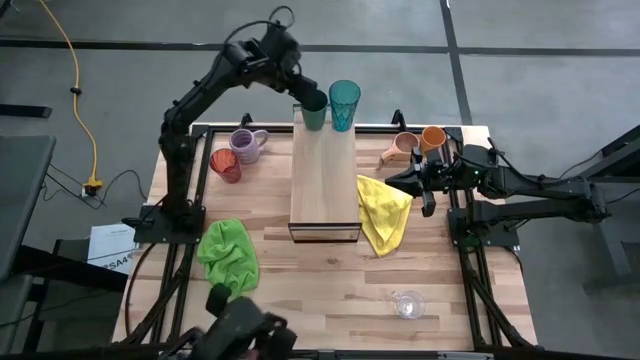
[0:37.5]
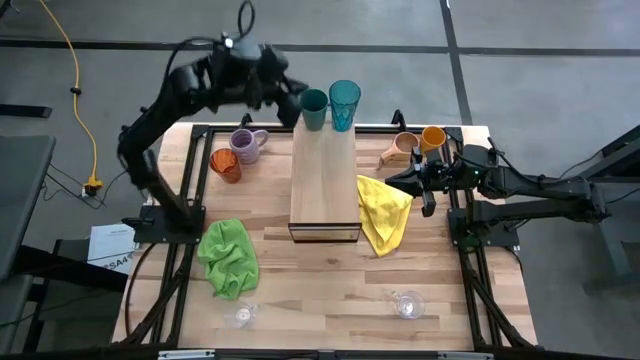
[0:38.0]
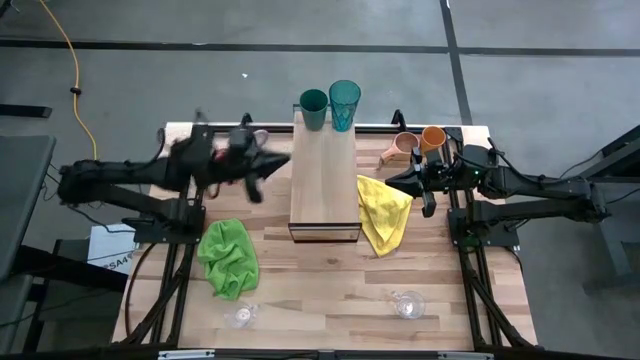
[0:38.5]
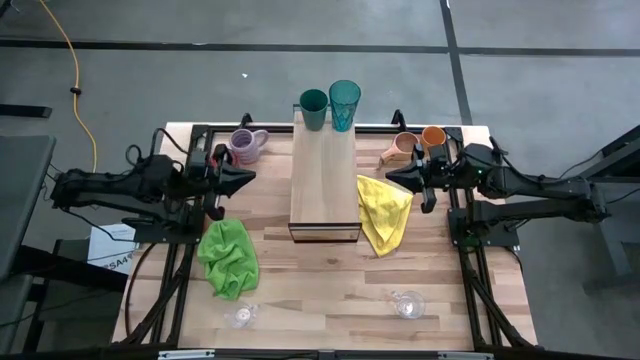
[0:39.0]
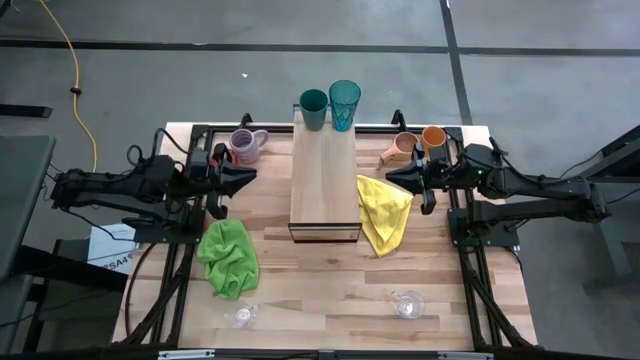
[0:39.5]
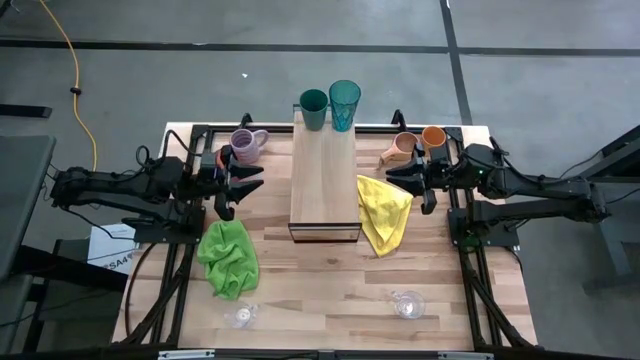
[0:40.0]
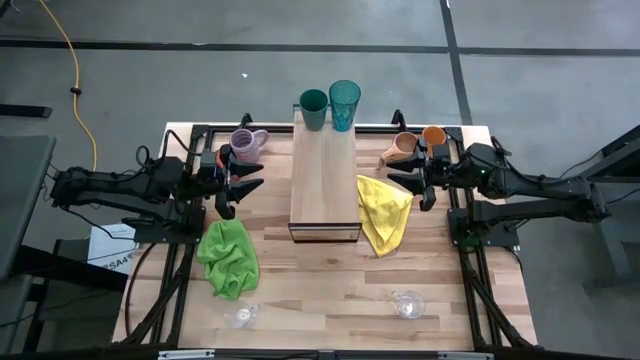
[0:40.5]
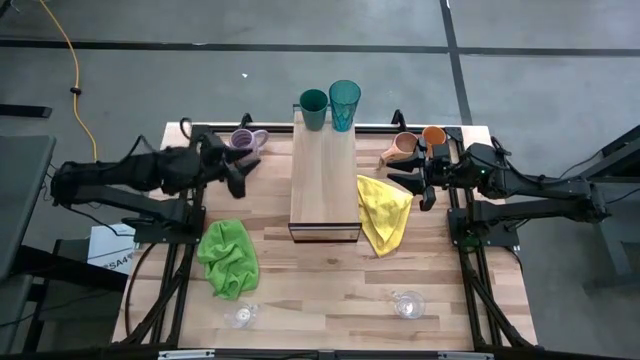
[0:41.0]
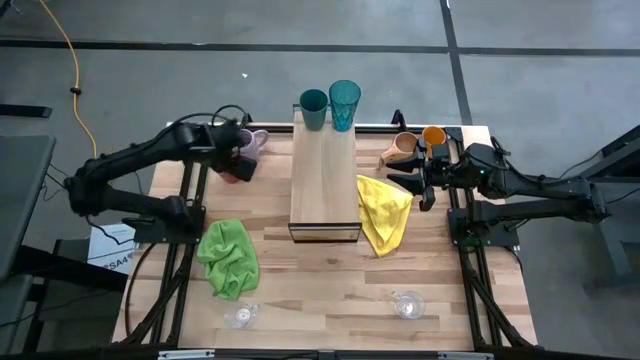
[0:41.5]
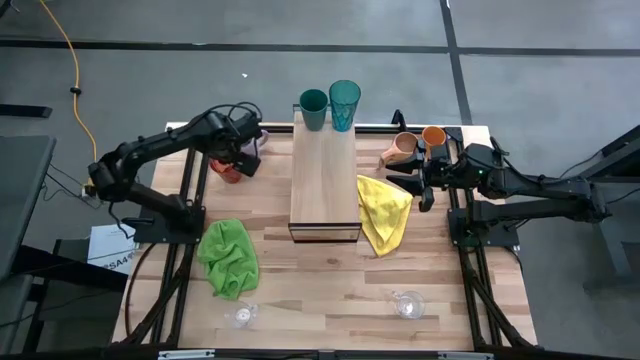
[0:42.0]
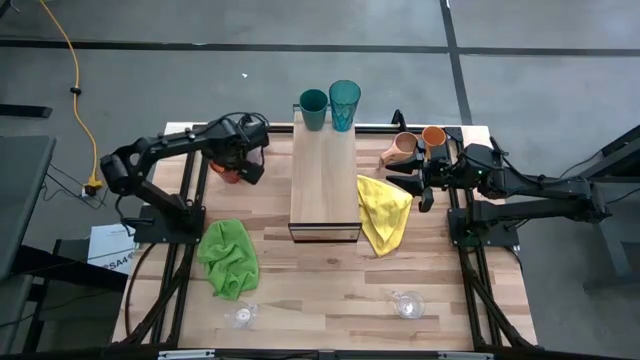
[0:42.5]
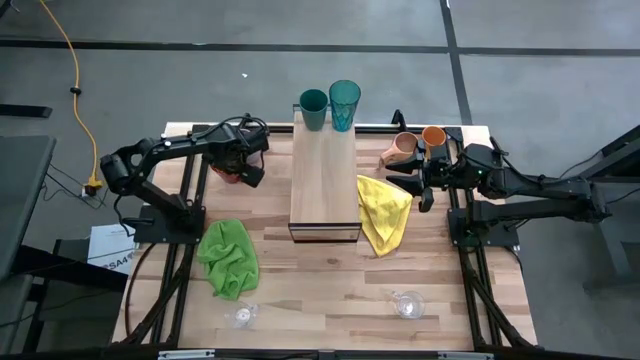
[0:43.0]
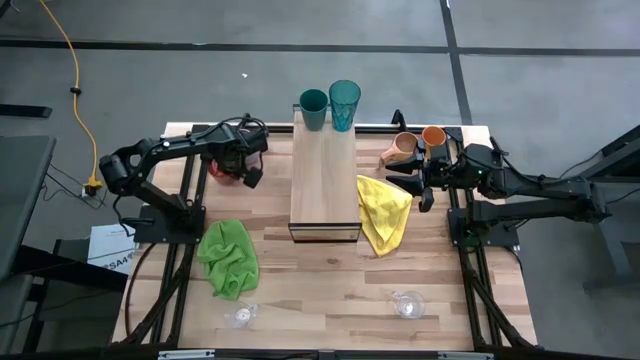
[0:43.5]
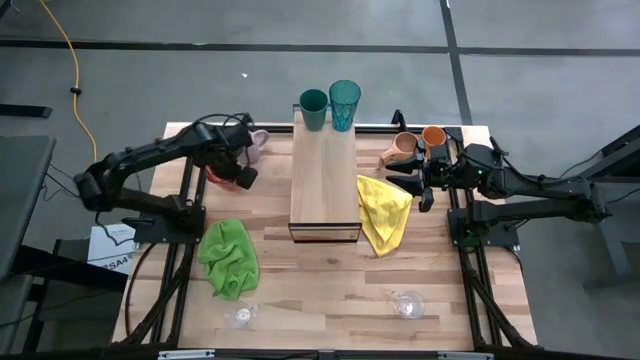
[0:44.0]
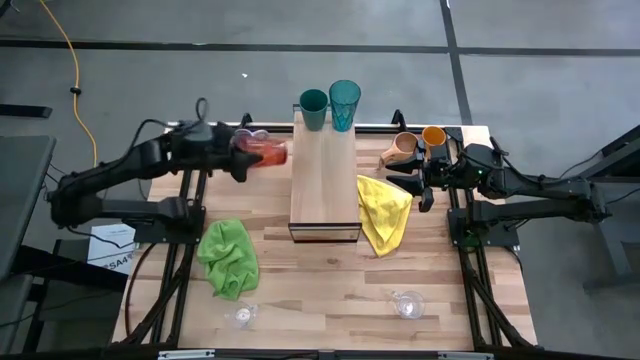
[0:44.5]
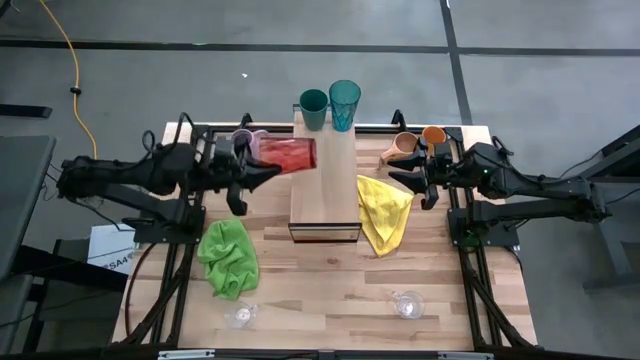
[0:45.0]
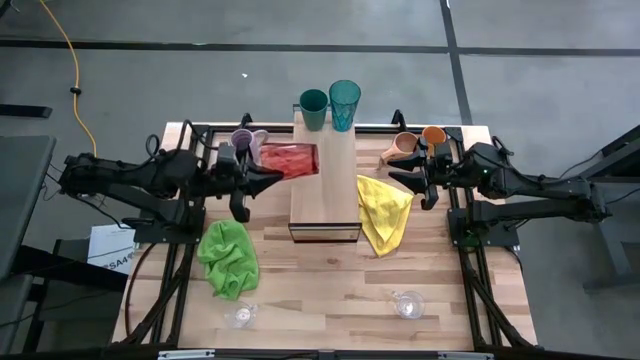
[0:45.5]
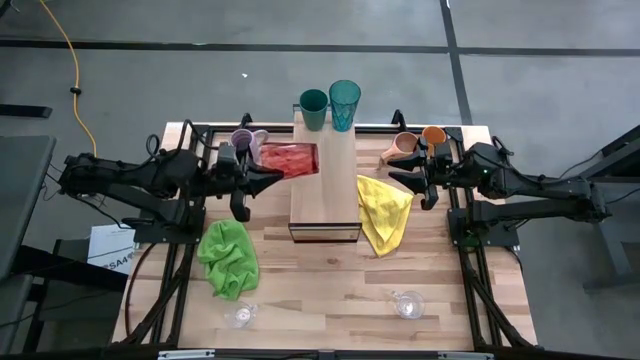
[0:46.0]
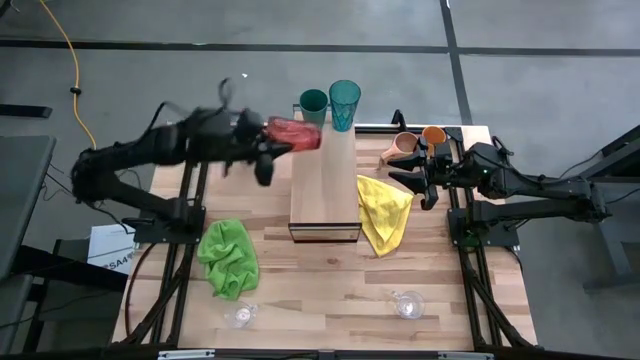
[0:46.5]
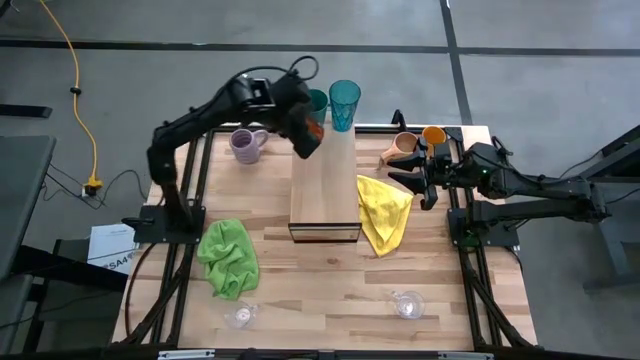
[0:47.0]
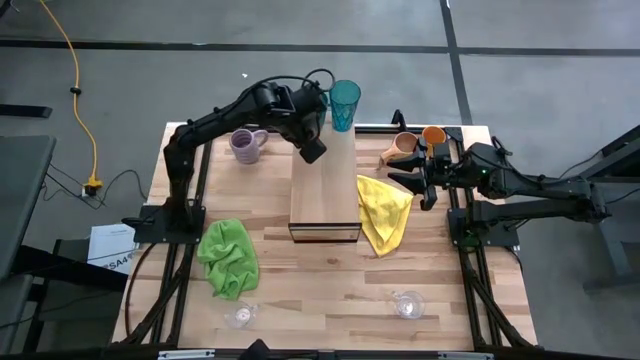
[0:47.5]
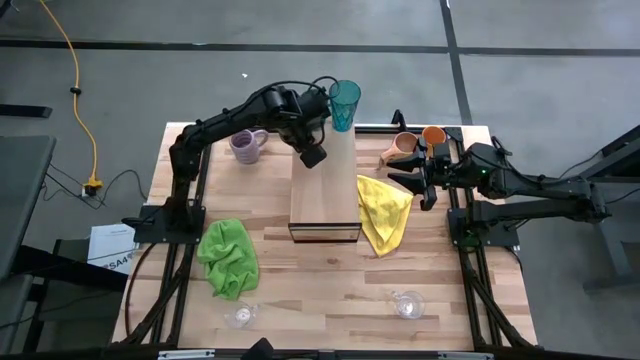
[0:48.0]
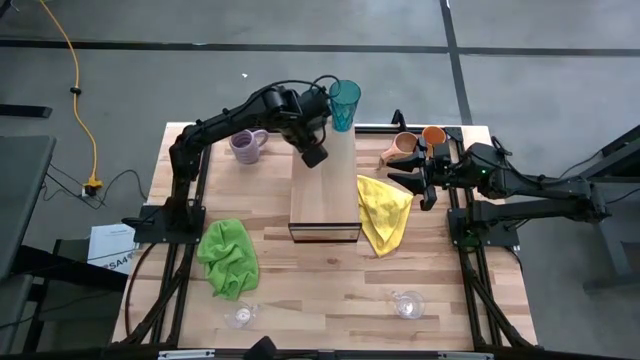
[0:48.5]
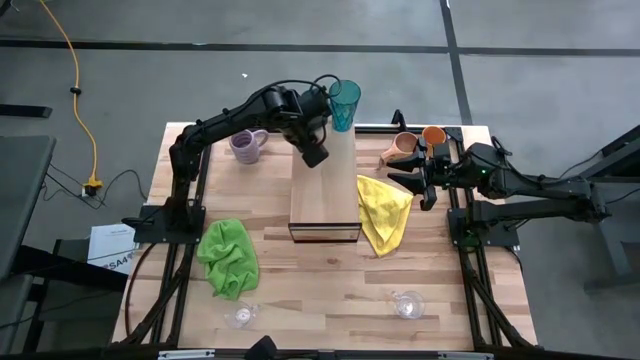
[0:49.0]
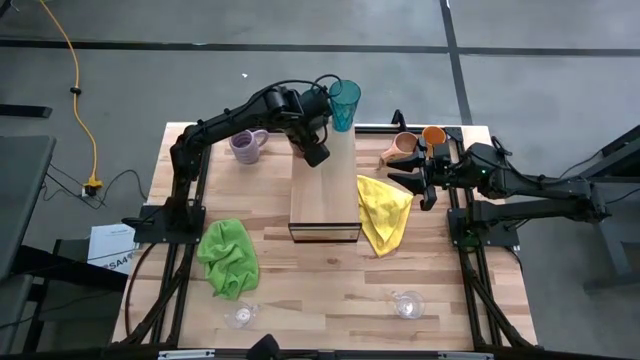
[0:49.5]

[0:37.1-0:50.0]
Task: Stack small to large cups/mugs on shelf
Put the red cup on the shelf

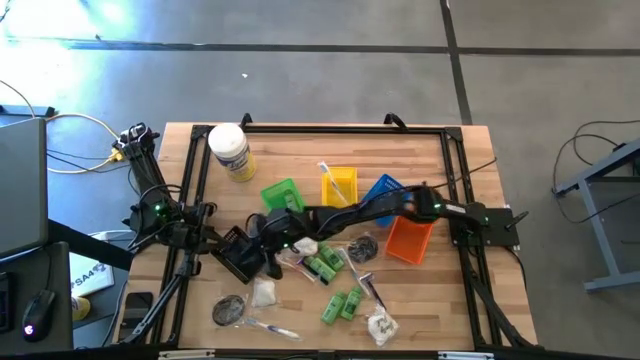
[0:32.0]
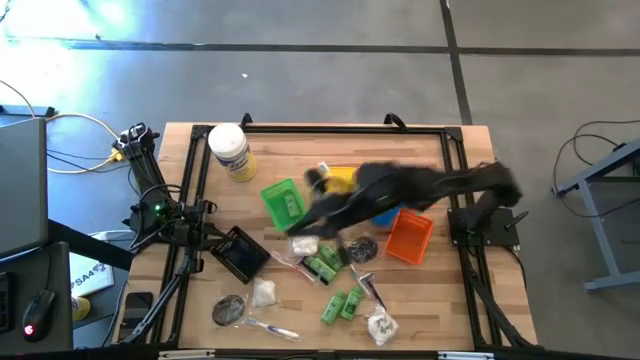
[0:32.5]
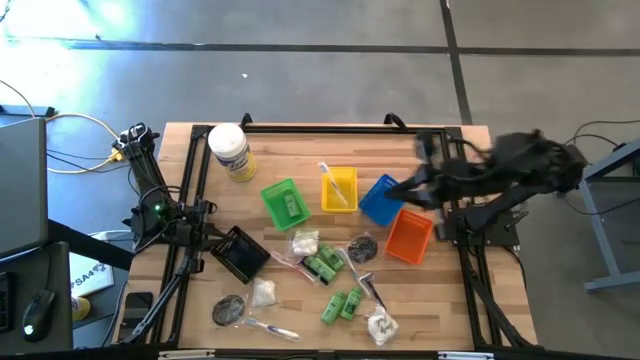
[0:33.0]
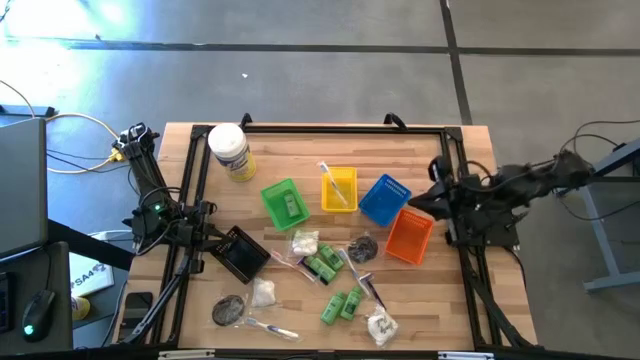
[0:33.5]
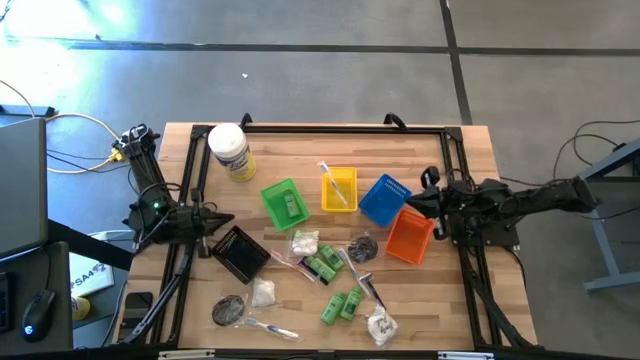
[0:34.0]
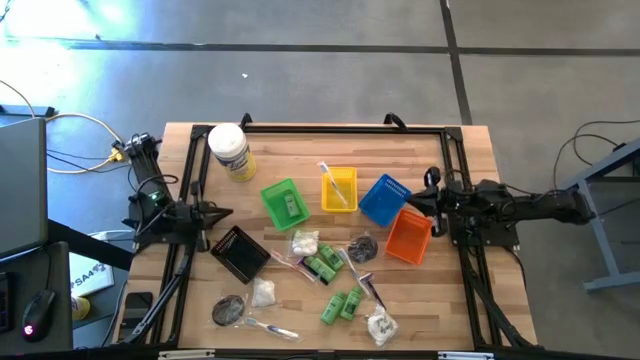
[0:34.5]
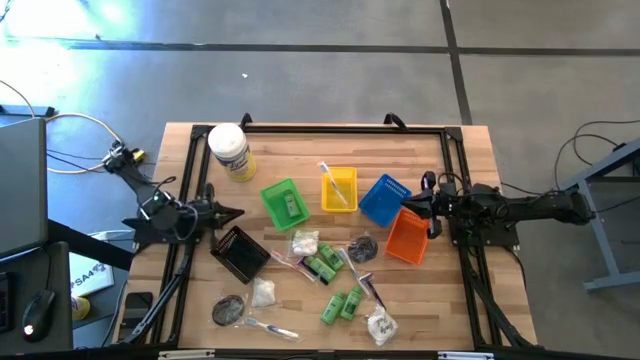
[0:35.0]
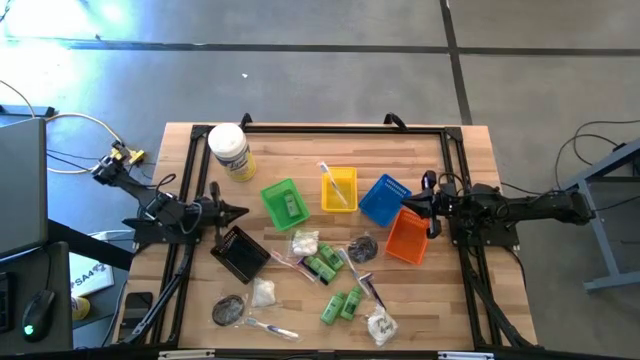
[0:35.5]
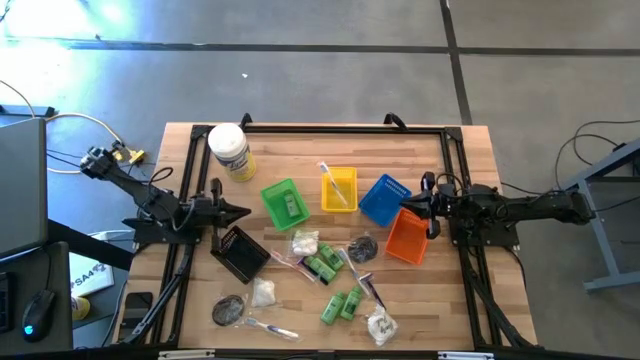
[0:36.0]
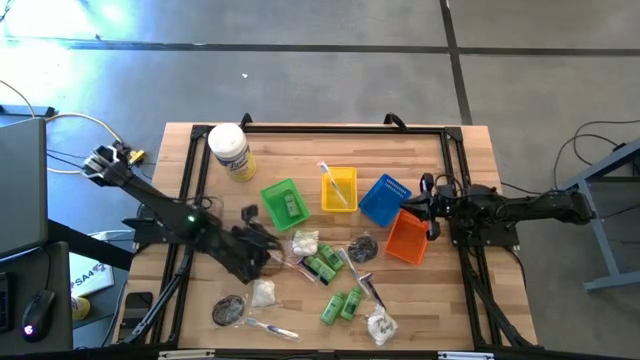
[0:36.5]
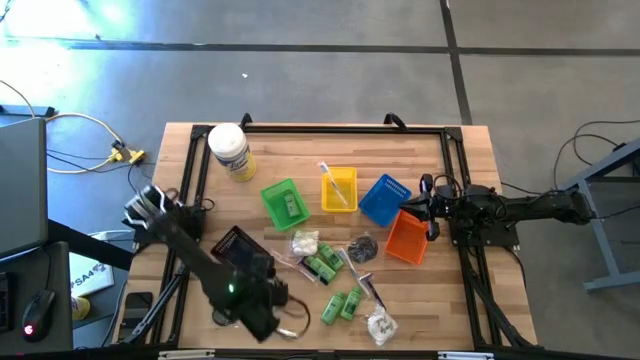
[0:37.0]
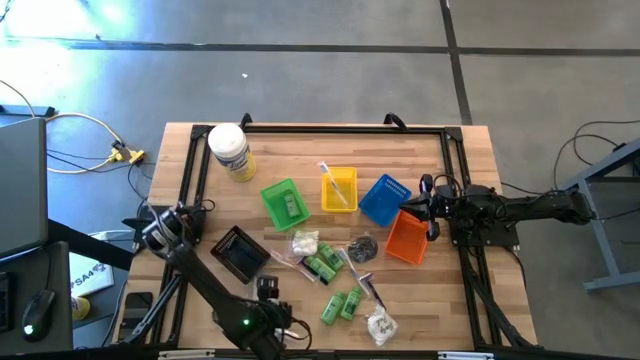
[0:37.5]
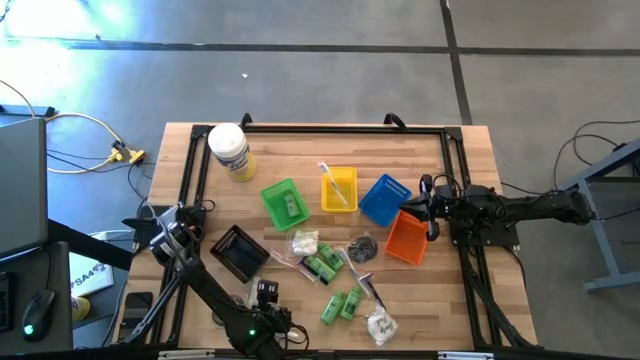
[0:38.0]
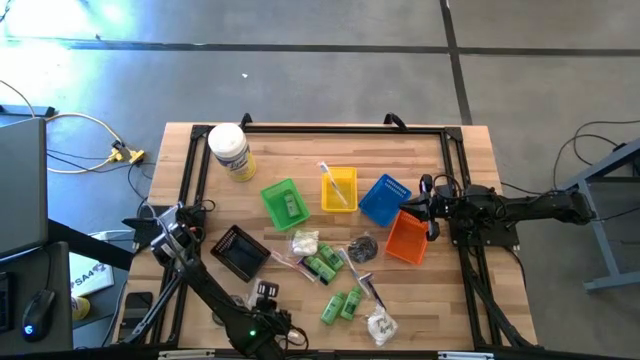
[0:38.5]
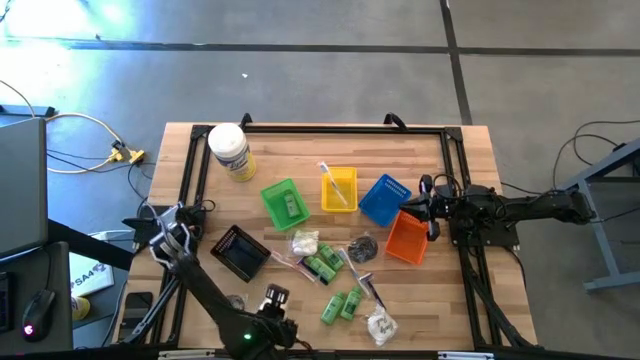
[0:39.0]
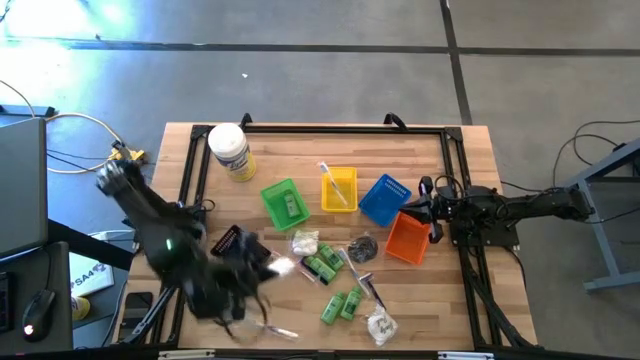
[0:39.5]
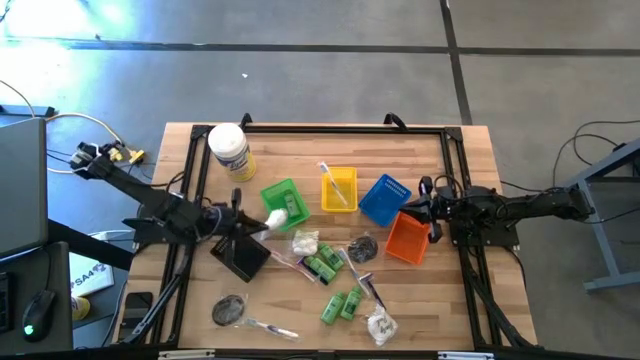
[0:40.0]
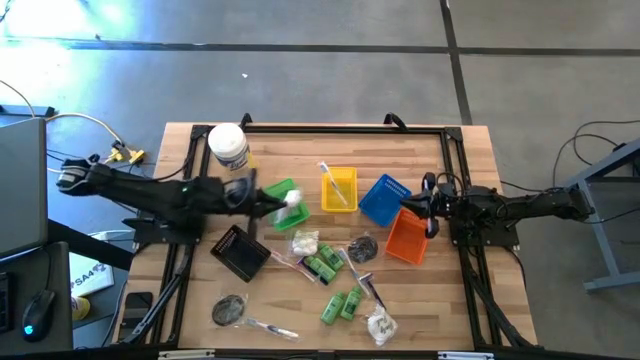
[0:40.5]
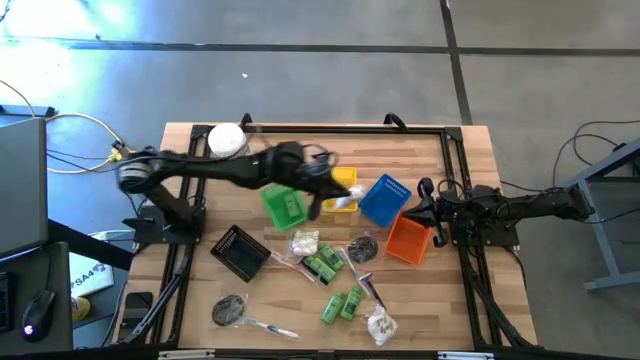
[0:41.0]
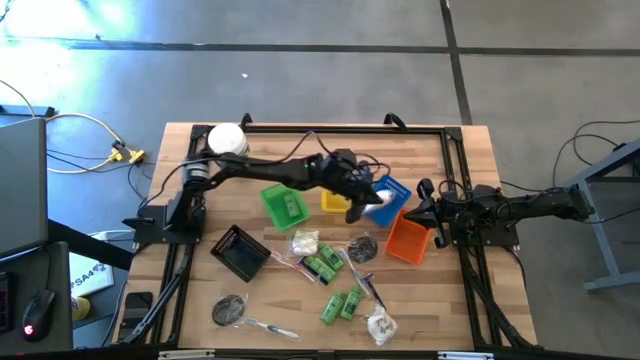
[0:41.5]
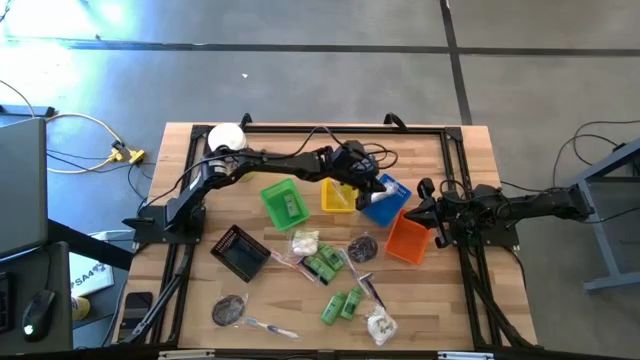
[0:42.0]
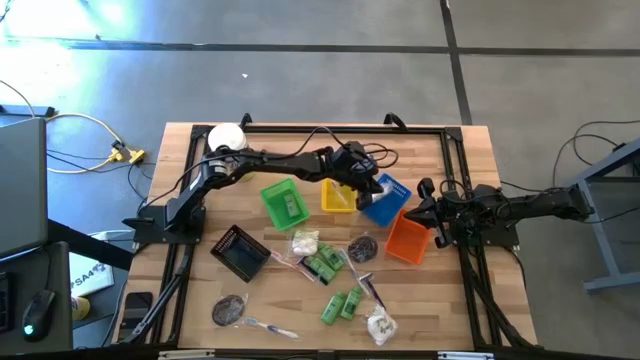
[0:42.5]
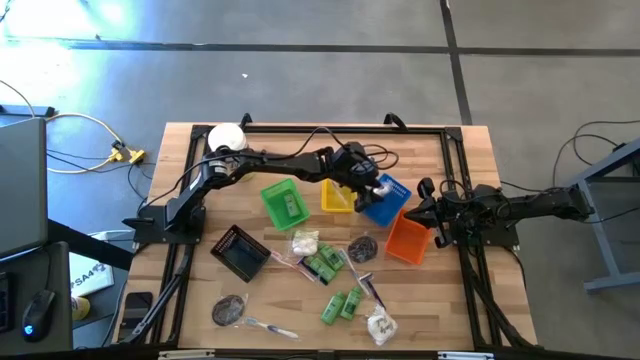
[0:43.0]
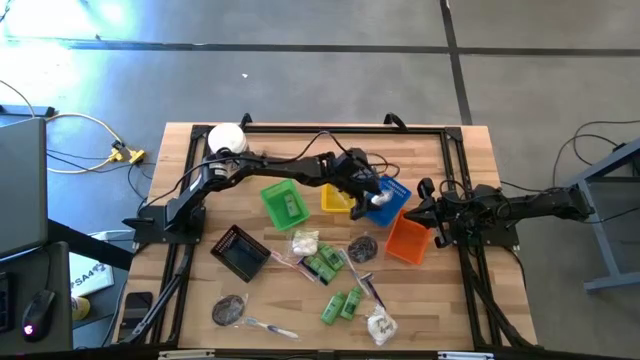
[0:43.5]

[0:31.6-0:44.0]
Task: Pick & Place Travel size toiletries
Put the bottom left cotton pack into the blue bin
